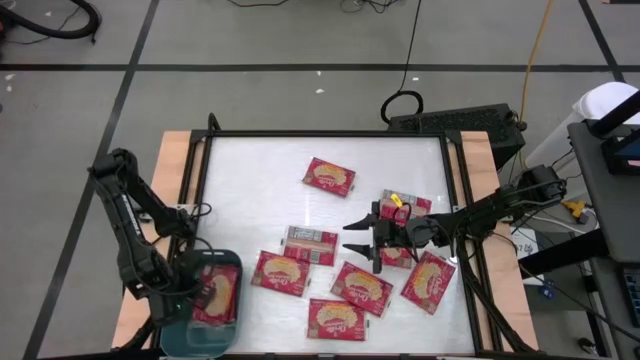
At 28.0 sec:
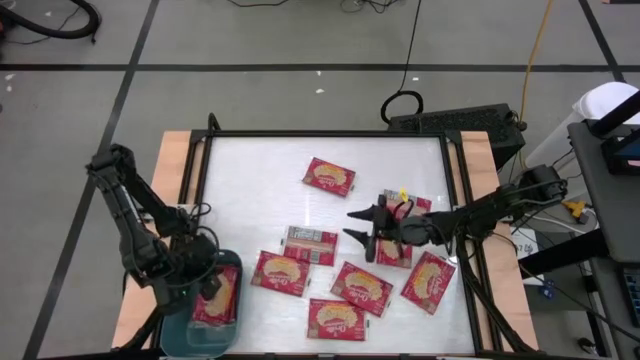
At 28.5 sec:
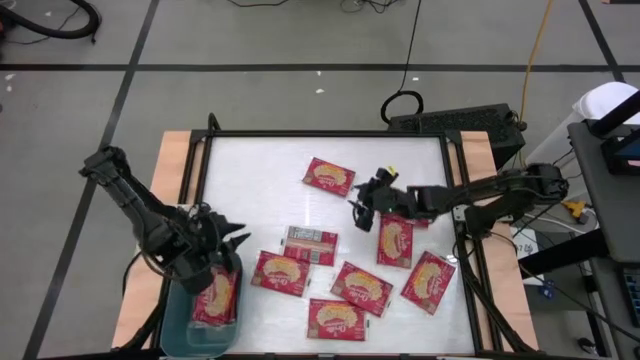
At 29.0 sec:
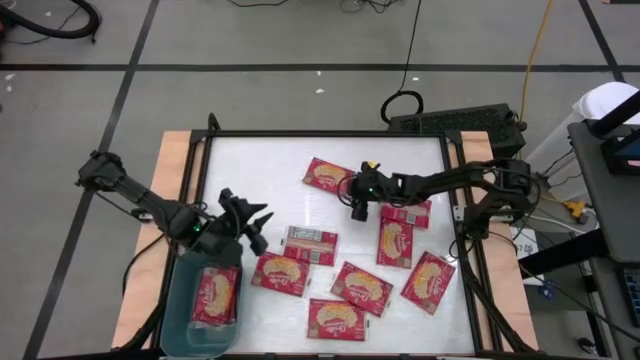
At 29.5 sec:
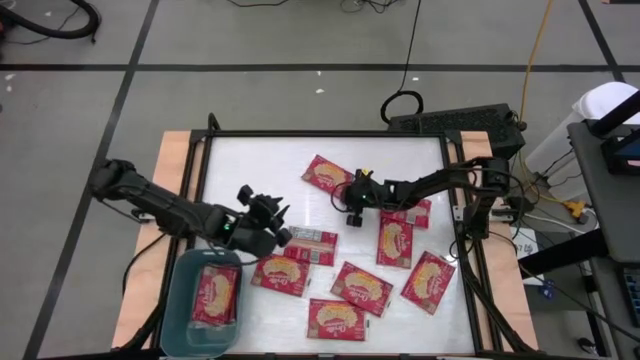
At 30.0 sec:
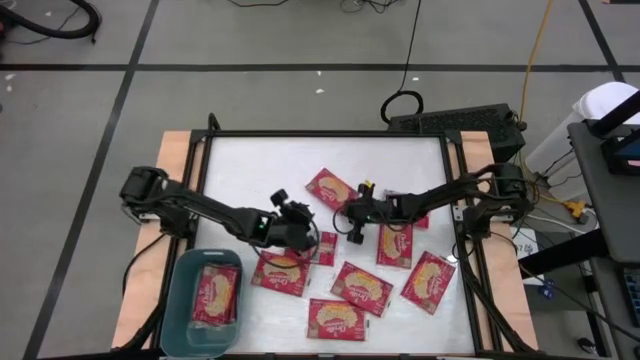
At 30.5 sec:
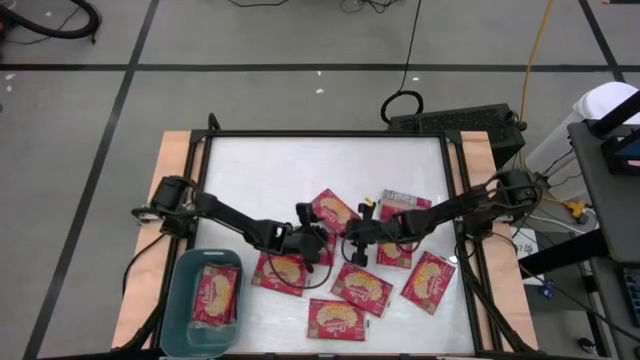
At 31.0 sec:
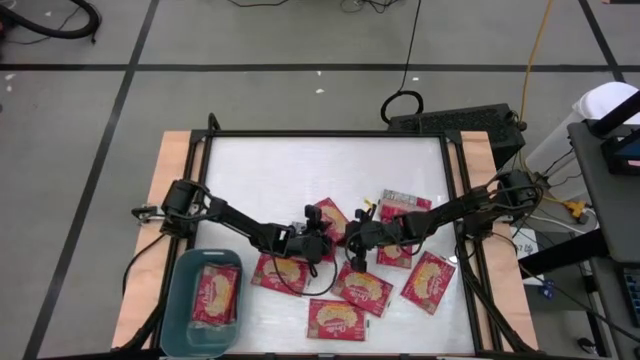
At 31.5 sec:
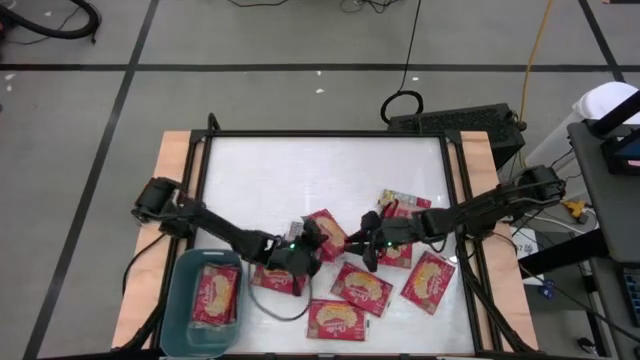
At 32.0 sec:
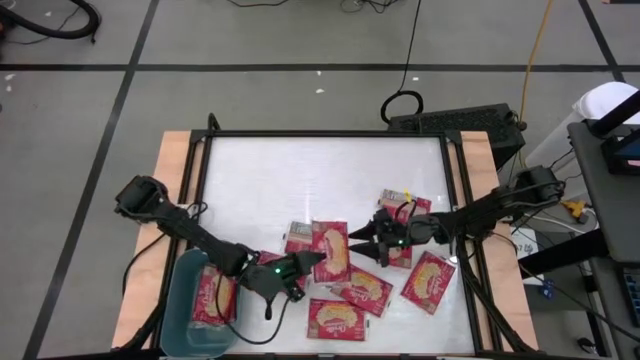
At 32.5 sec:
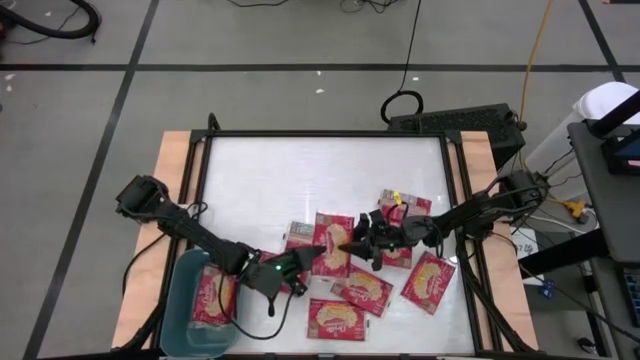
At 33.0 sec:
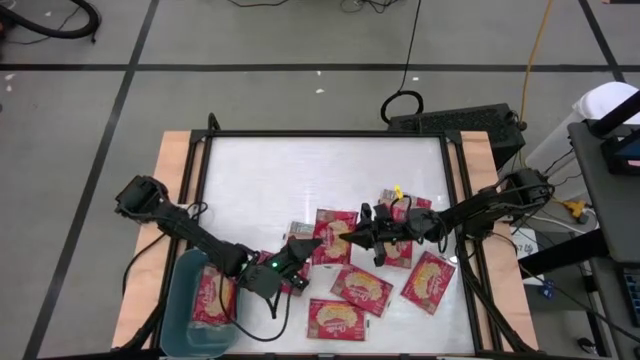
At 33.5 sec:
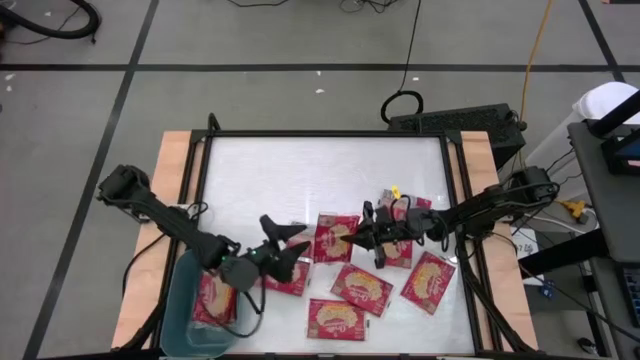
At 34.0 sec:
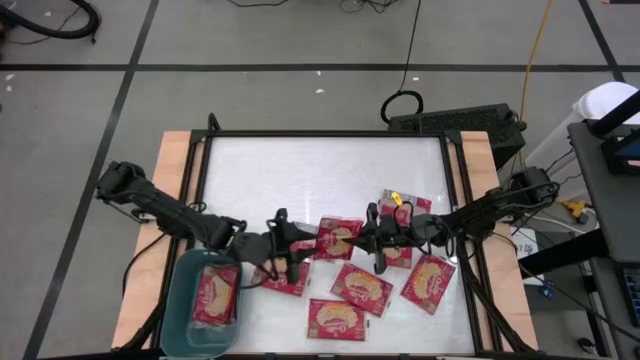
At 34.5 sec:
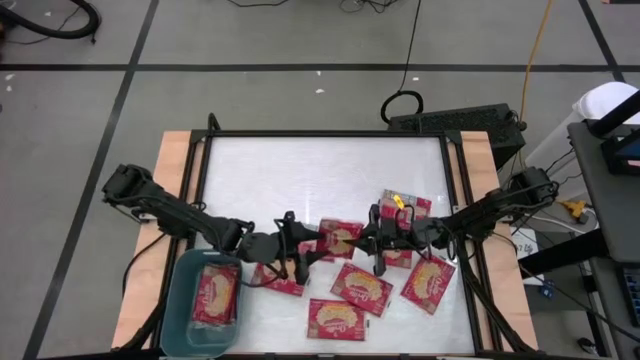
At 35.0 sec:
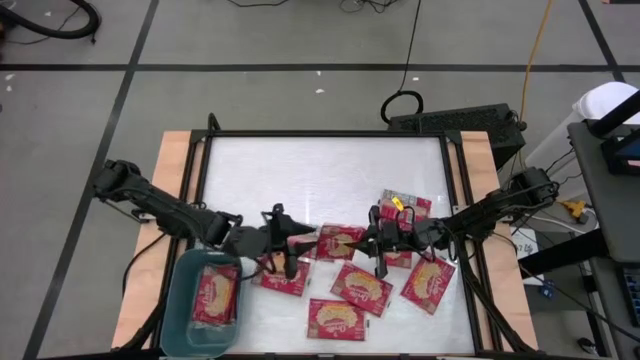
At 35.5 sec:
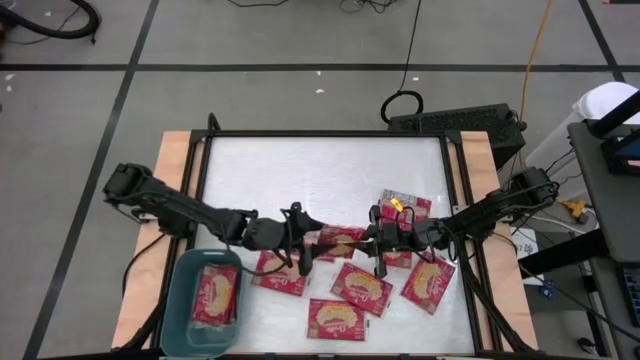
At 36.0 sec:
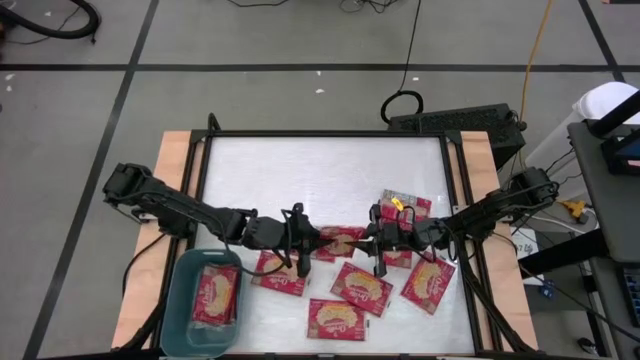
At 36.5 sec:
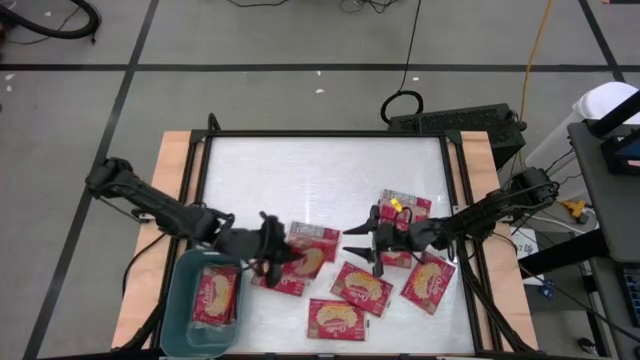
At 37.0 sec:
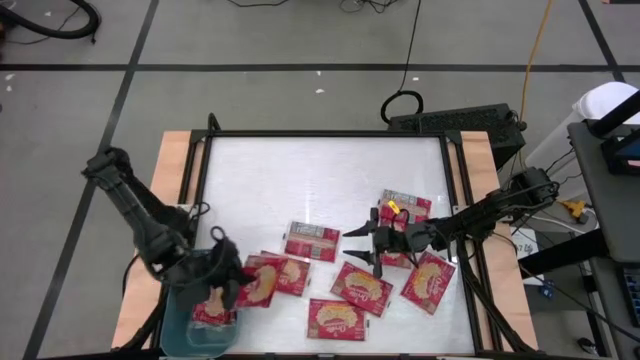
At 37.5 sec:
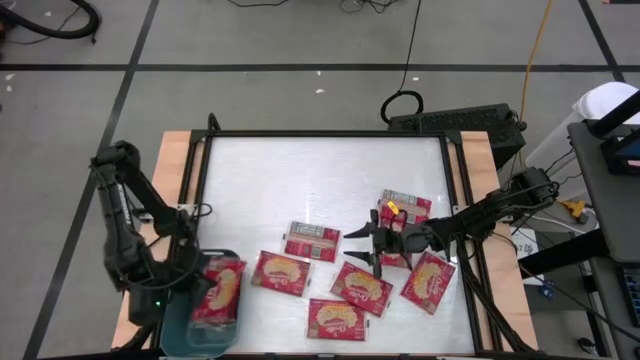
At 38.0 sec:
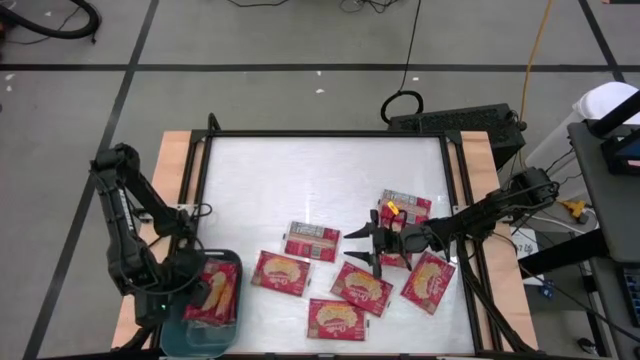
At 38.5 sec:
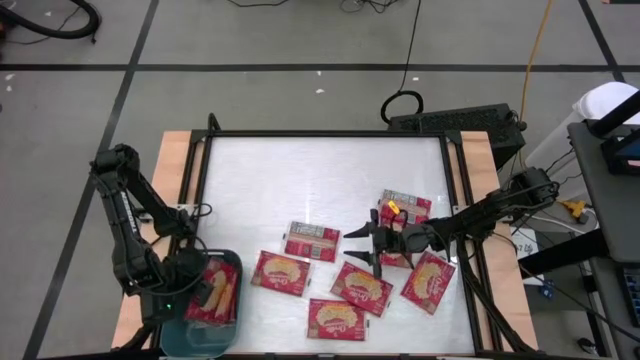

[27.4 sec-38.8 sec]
Task: Sort popcorn bags into baskets
Put the red popcorn bag into the blue bin

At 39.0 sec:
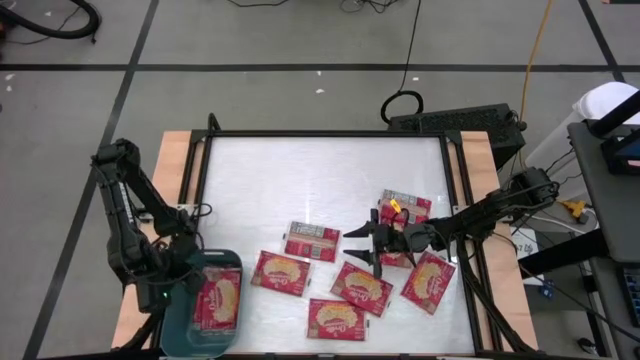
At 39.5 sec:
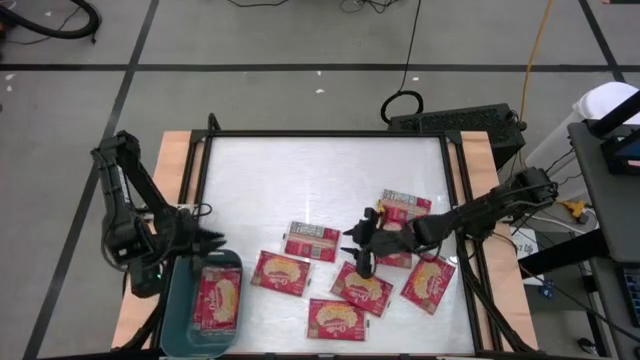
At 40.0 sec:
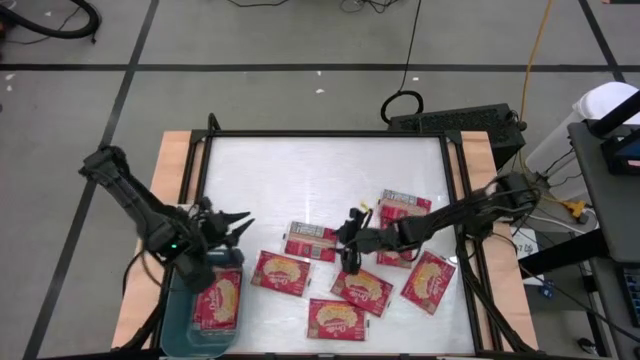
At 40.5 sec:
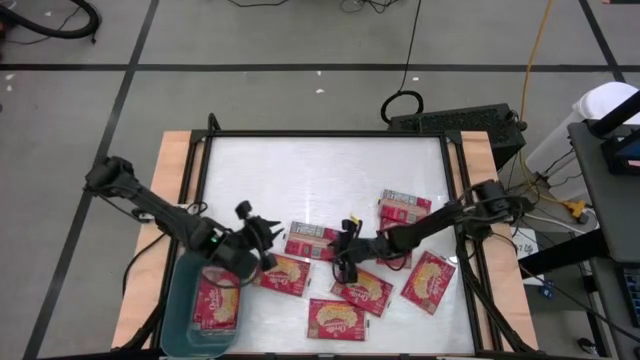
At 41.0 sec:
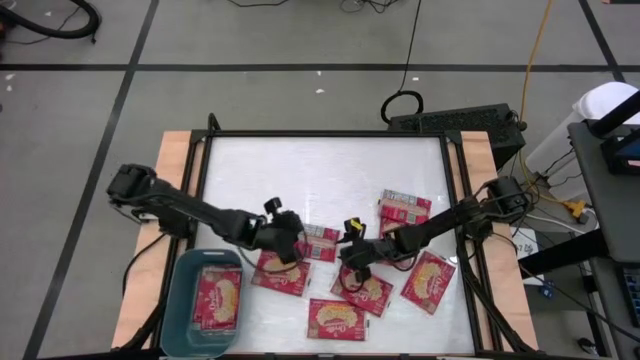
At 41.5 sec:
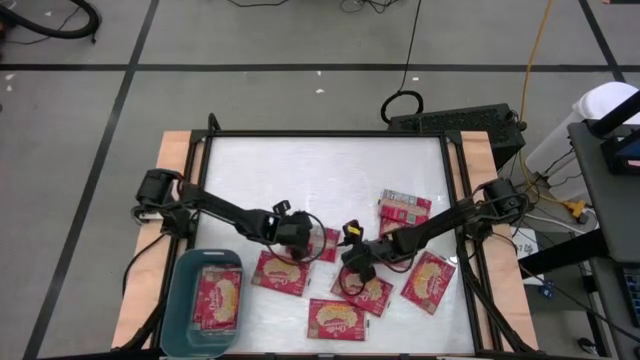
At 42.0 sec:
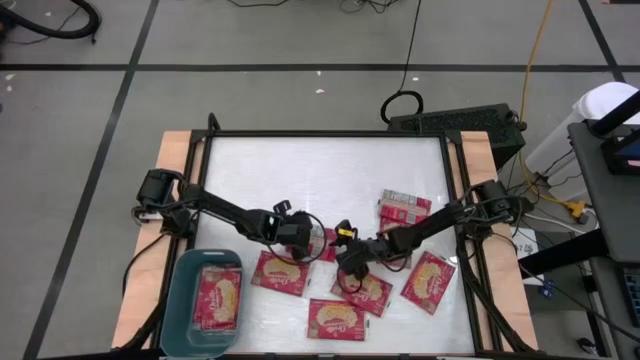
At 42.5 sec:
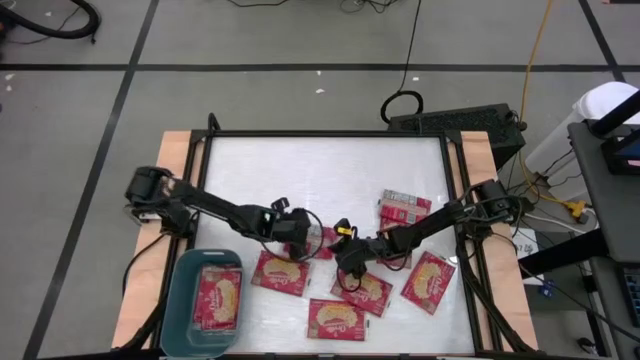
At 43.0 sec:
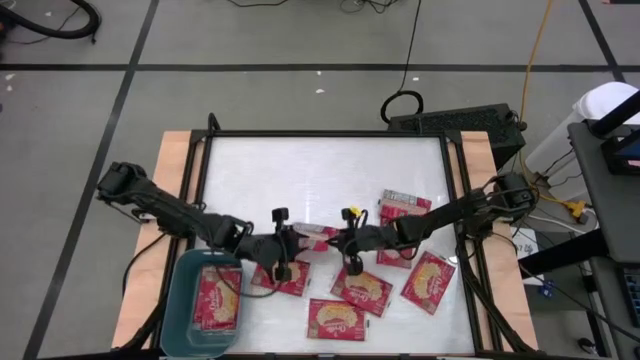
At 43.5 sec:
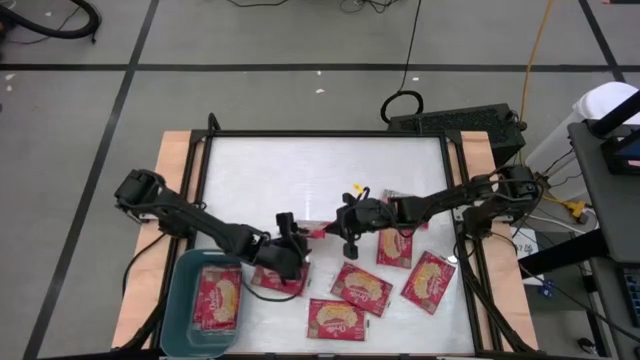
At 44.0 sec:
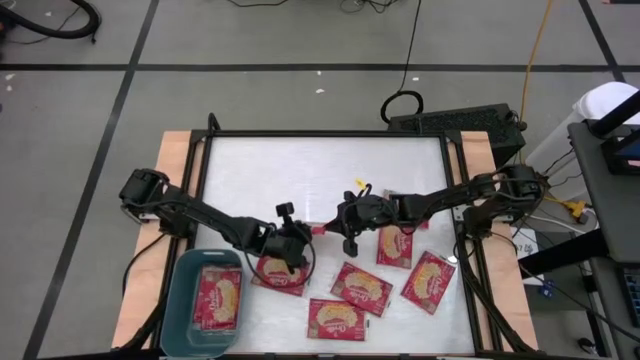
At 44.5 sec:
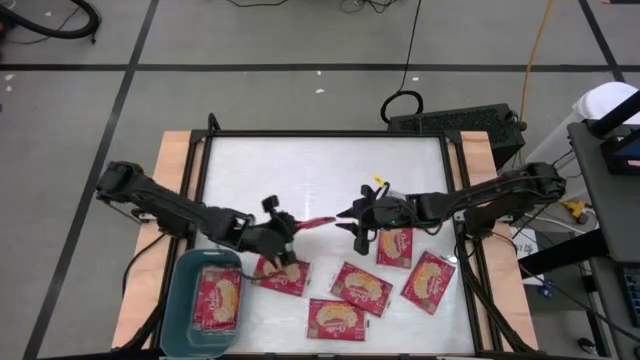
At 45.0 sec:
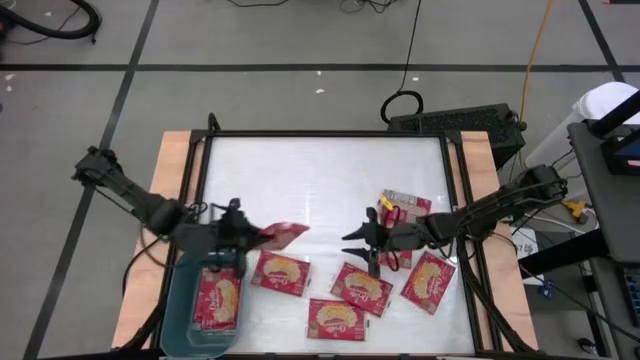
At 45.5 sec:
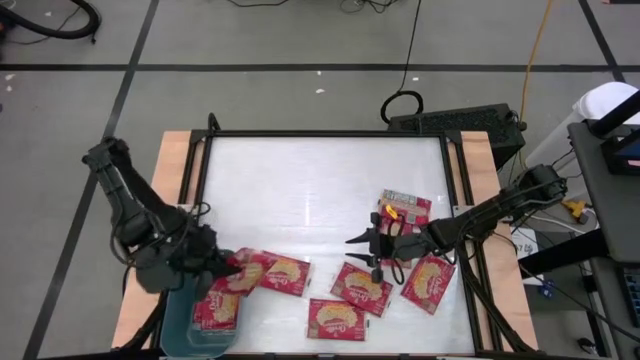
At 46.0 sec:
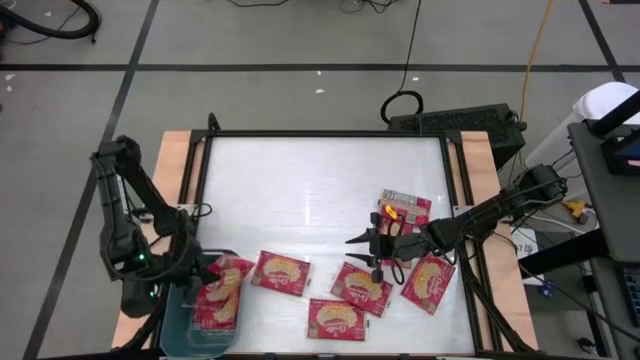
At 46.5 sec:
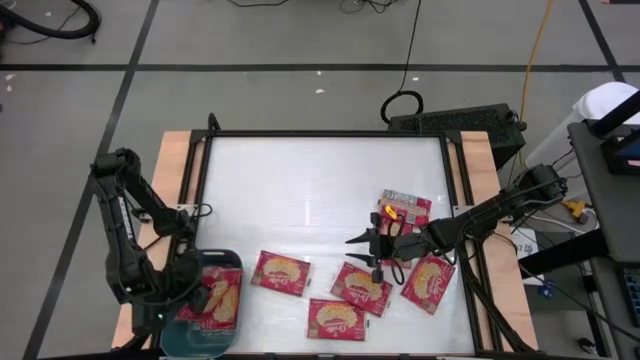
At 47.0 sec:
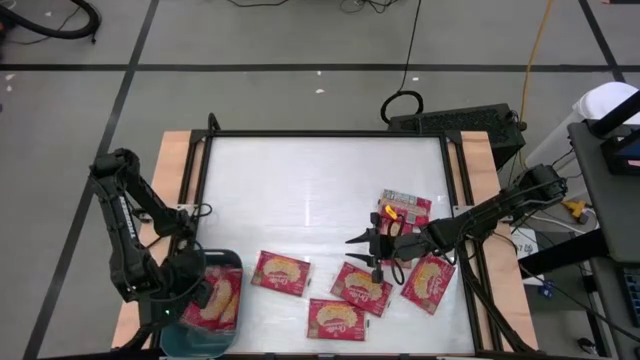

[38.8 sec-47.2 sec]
Put the red popcorn bag into the blue bin

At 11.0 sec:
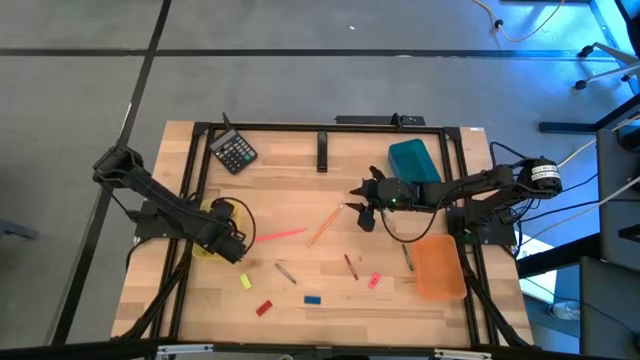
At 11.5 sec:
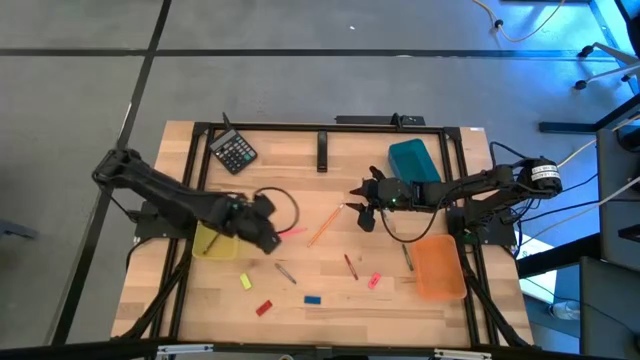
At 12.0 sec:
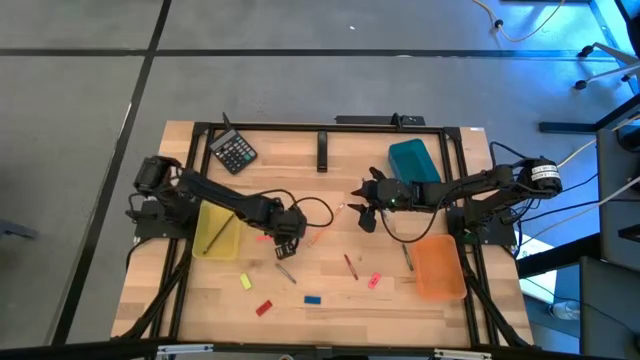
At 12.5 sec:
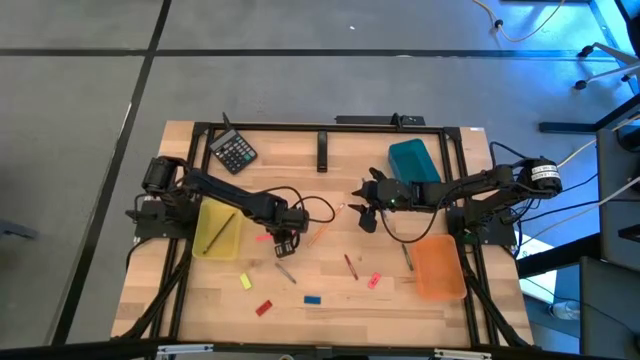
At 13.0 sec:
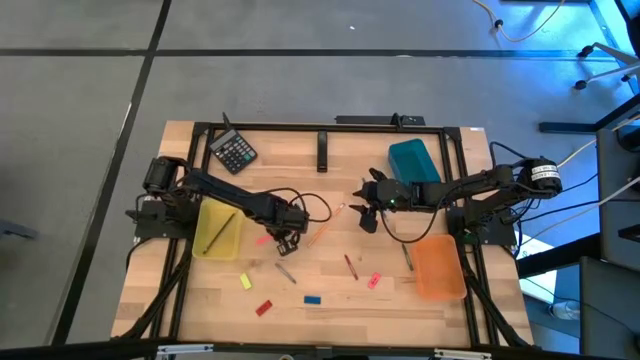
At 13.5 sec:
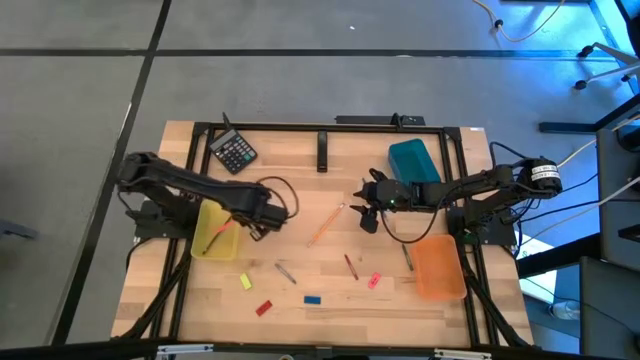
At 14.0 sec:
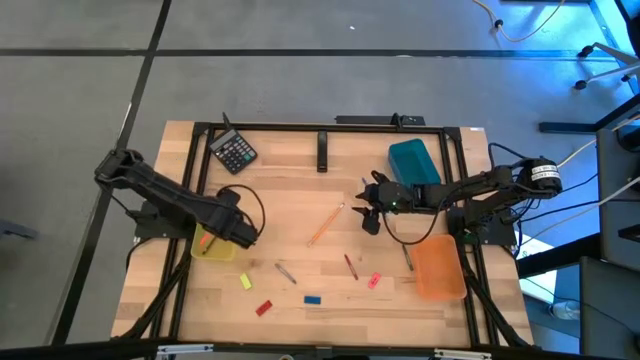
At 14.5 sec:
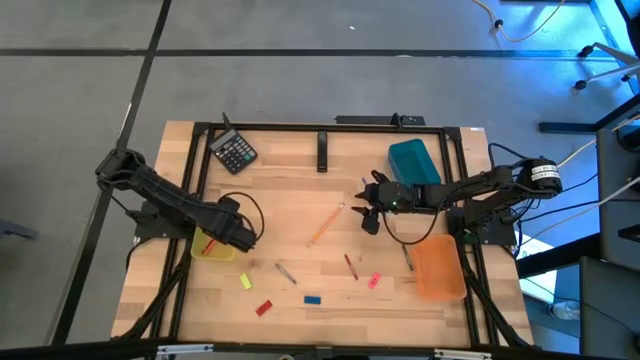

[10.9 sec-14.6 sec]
Task: Sort crayons/erasers/pens/pencils in bins
Put the pink pencil into the yellow bin
